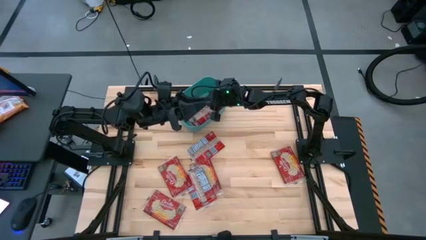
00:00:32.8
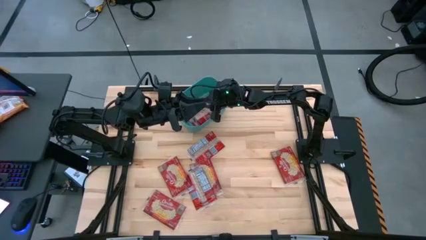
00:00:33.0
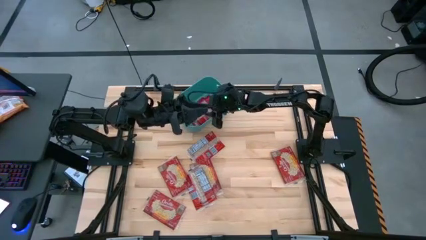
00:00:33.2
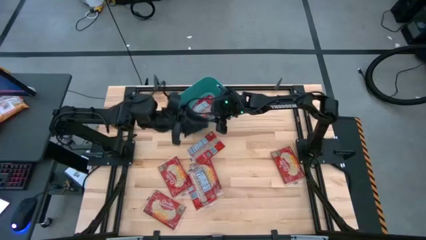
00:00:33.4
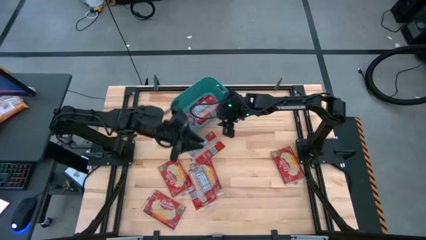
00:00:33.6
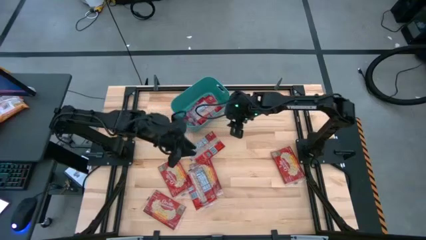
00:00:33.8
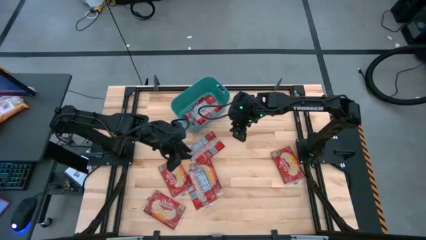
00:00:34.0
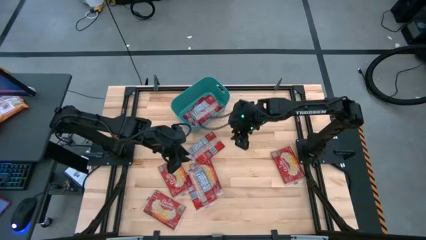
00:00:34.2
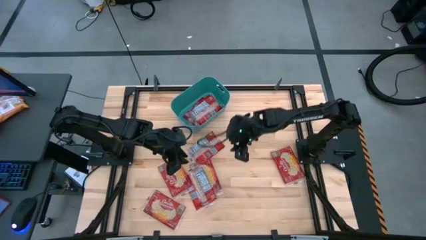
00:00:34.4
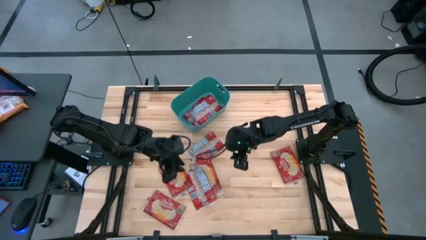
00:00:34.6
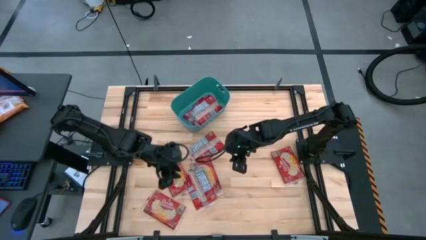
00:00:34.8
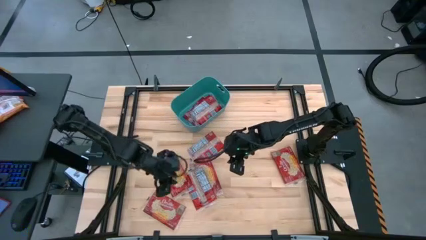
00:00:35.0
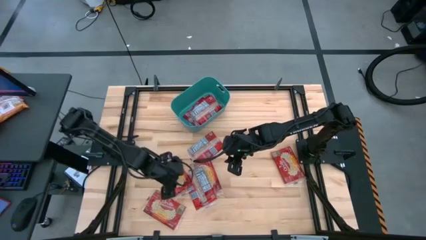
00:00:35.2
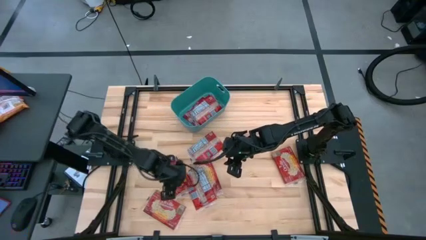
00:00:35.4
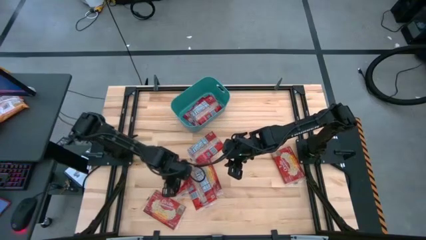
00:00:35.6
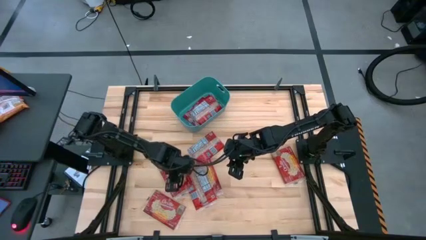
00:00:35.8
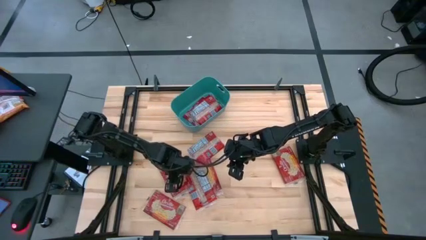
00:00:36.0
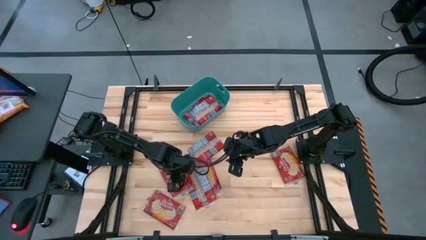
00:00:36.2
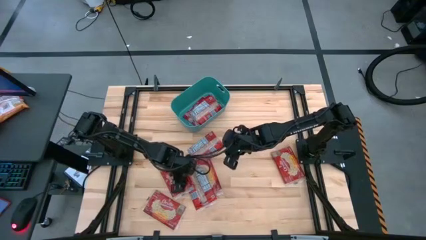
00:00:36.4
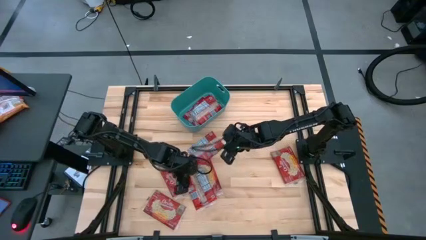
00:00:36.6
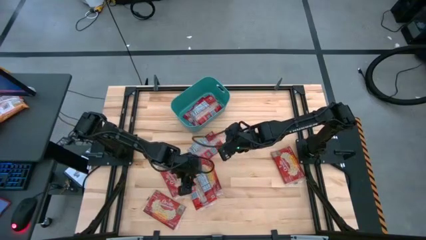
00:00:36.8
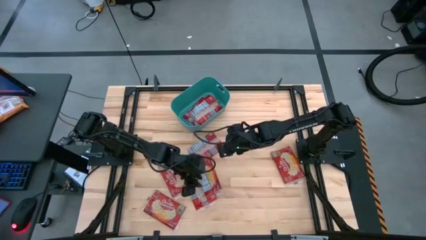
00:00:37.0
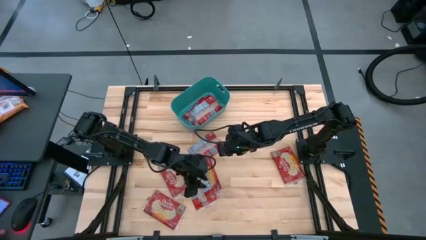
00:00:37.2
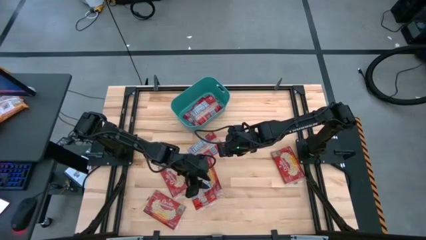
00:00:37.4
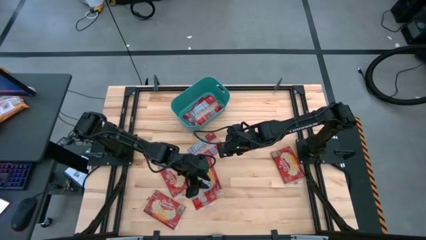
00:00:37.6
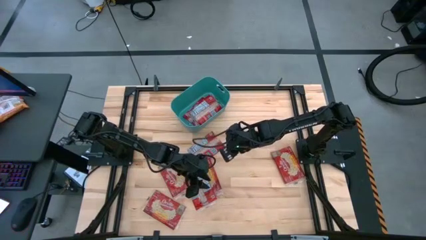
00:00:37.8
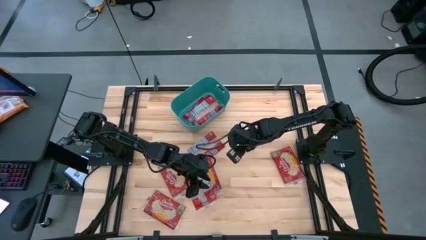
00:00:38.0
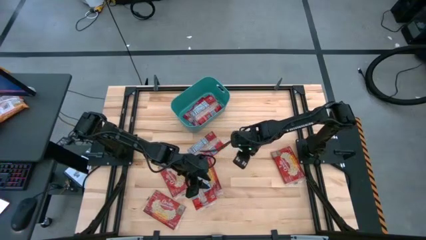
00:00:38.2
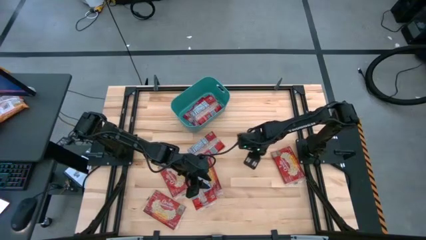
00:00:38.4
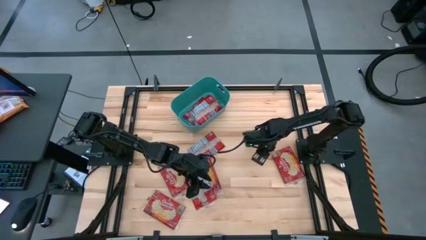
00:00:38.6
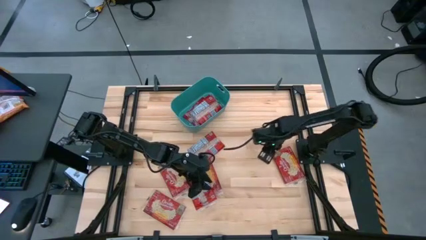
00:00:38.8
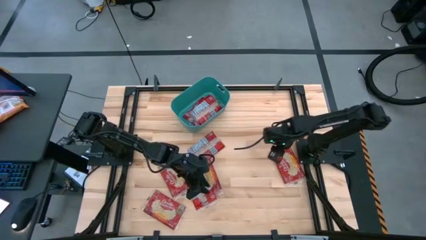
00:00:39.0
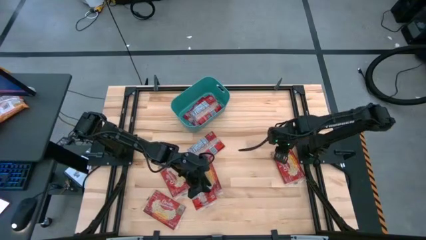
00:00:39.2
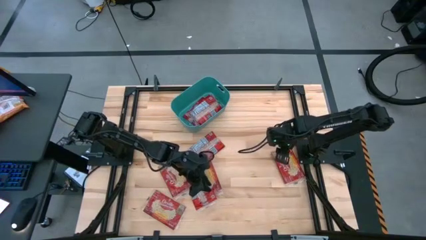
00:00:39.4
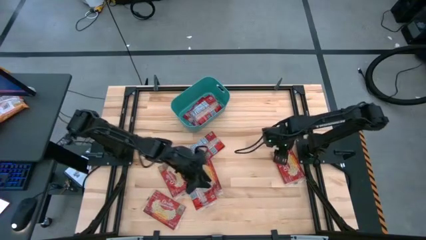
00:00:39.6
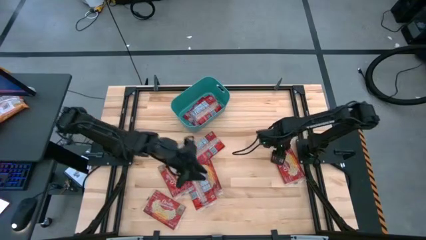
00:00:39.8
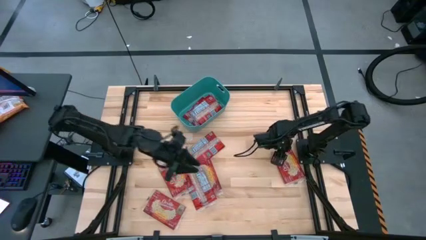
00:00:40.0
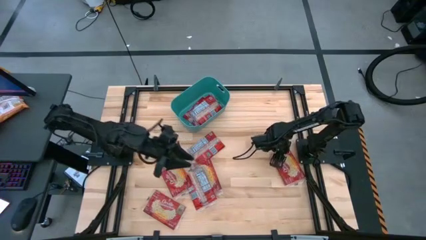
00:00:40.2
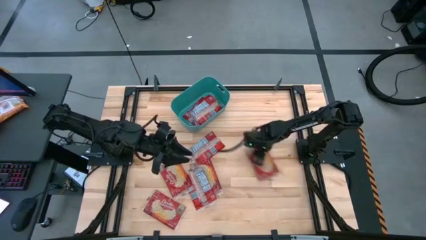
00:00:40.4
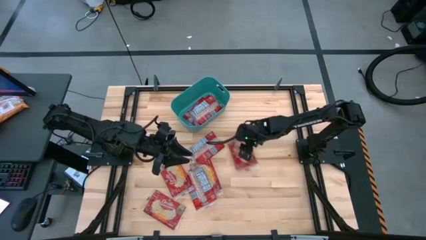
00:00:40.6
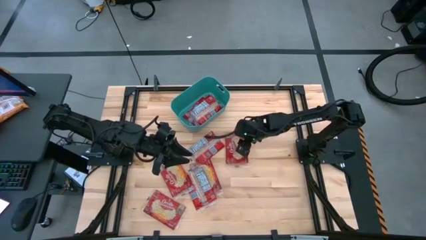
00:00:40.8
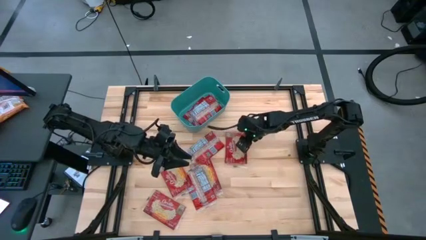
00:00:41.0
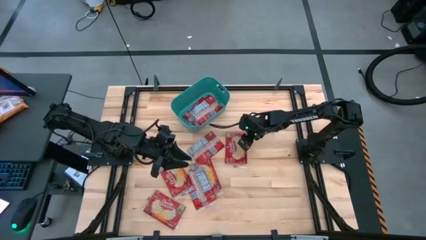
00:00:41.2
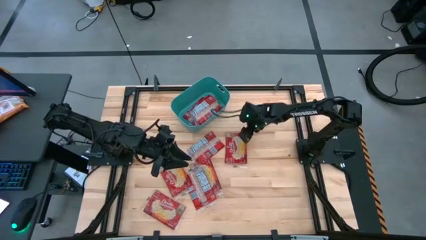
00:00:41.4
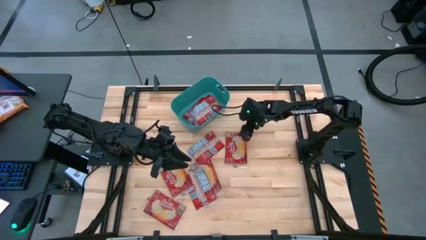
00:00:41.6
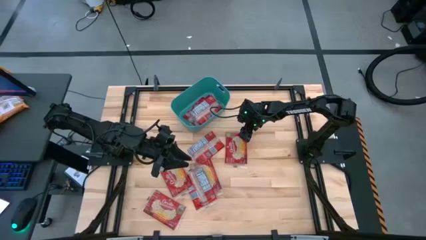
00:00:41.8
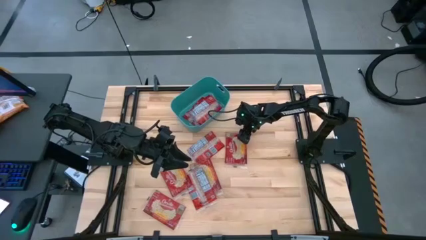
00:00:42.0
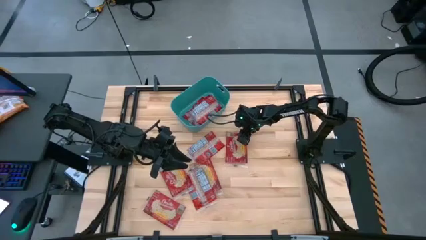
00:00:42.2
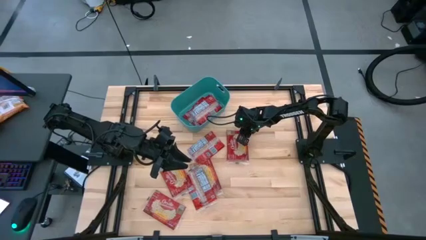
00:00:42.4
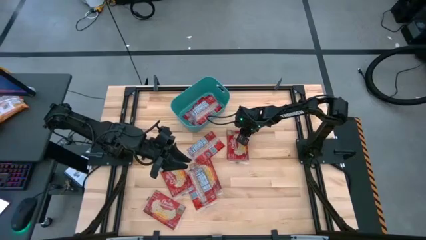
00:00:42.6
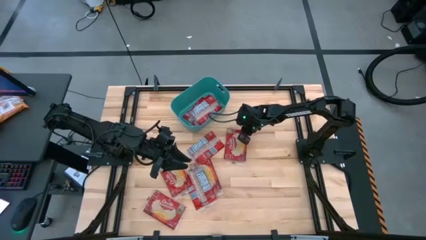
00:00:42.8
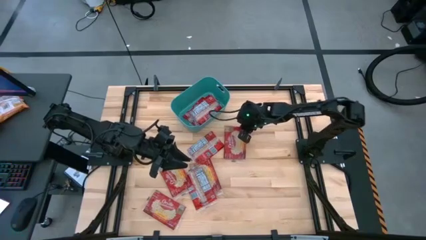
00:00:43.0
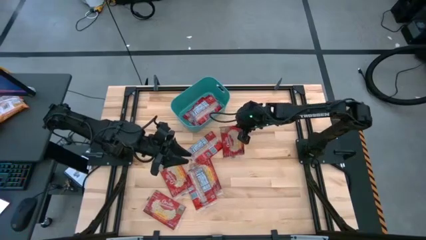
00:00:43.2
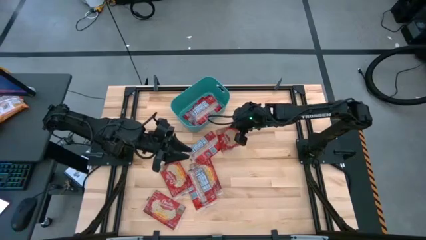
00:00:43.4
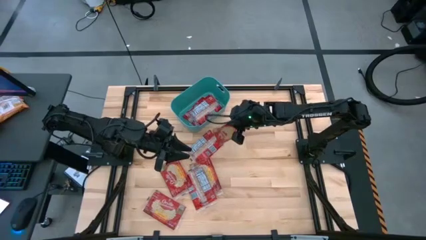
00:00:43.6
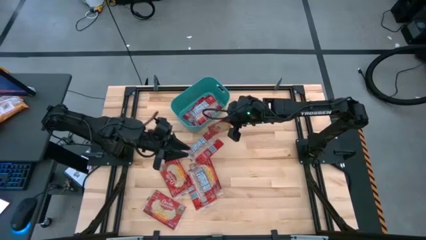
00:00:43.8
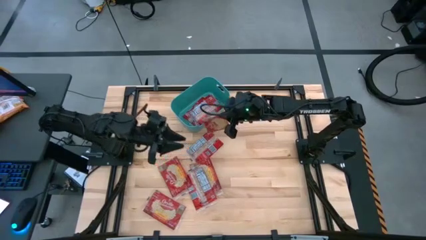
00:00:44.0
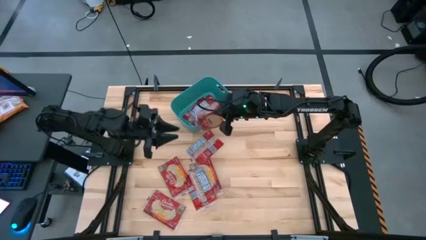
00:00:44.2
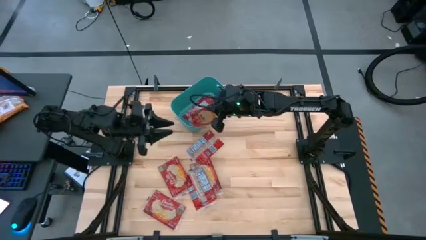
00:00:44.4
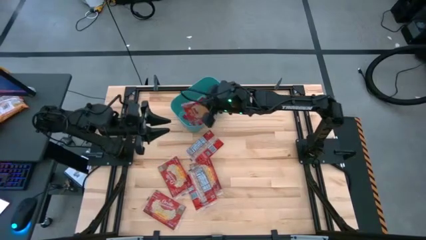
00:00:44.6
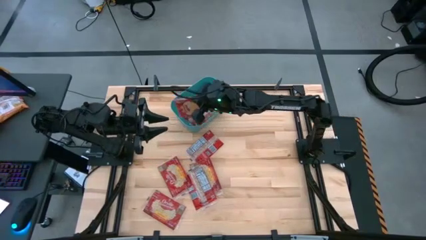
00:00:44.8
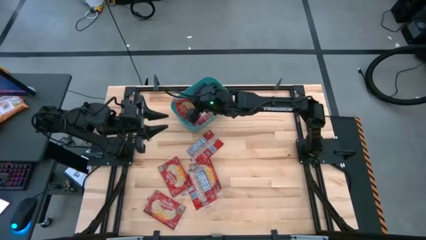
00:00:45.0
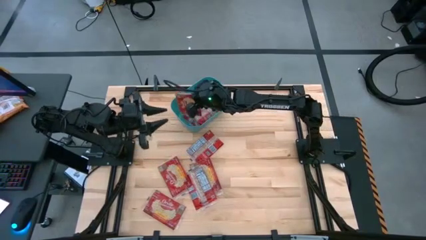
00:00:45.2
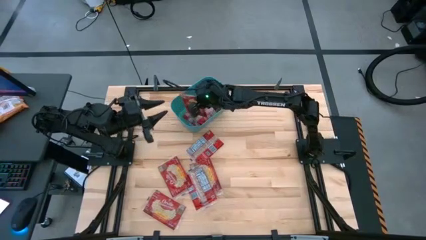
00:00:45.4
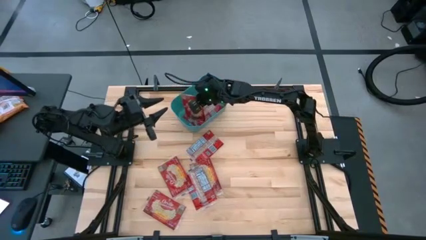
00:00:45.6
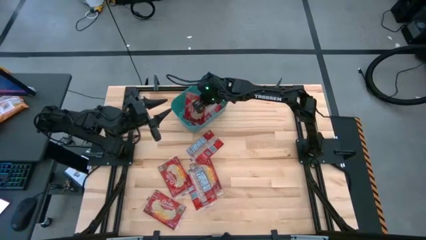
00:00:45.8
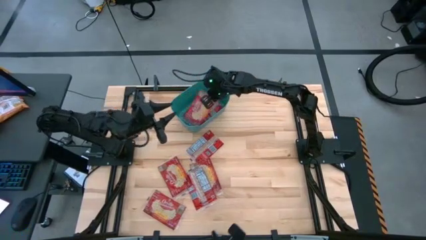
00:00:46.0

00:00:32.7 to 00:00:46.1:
Task: Sort popcorn bags into baskets
Put the red popcorn bag into the blue bin
